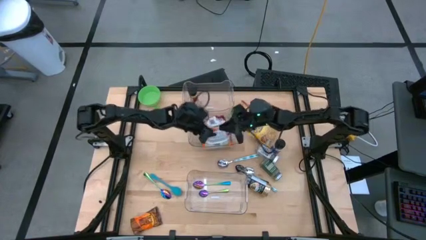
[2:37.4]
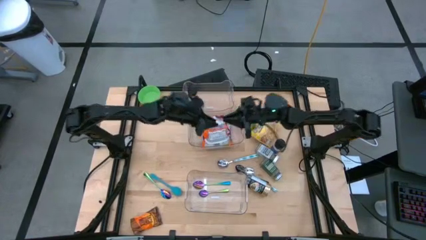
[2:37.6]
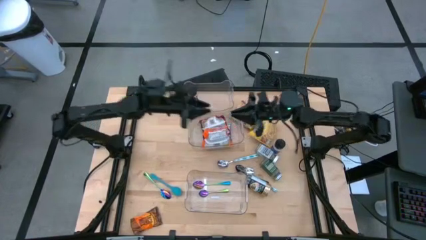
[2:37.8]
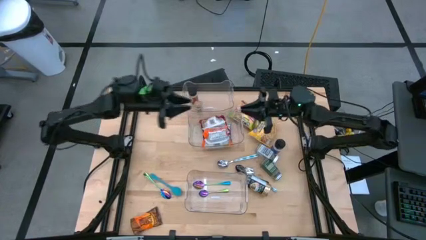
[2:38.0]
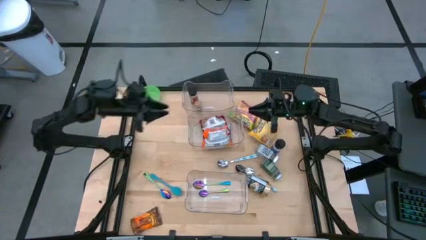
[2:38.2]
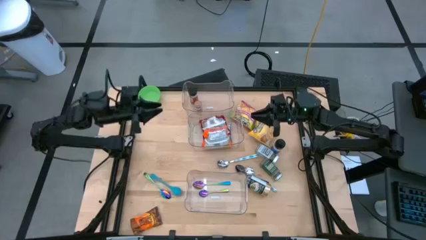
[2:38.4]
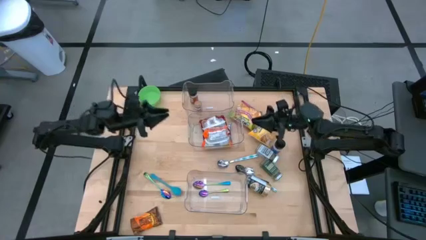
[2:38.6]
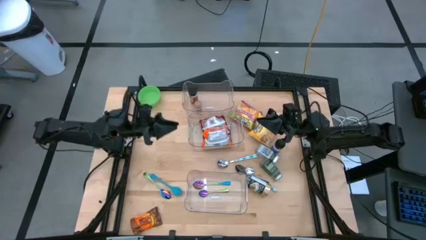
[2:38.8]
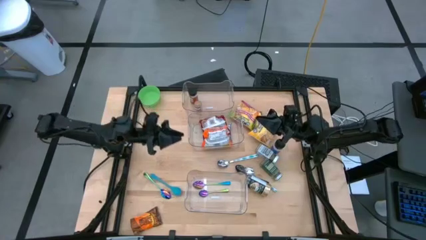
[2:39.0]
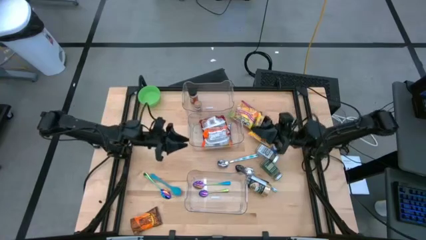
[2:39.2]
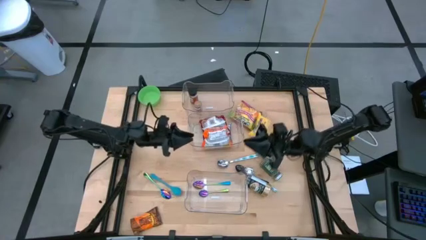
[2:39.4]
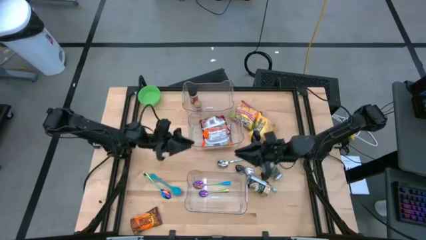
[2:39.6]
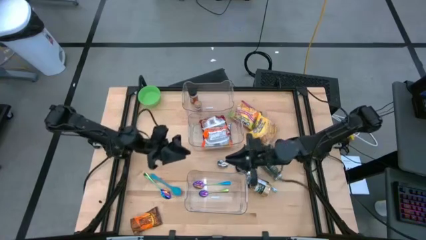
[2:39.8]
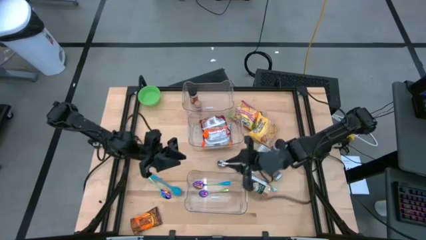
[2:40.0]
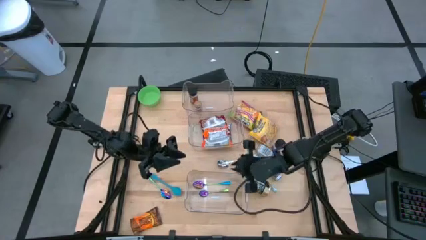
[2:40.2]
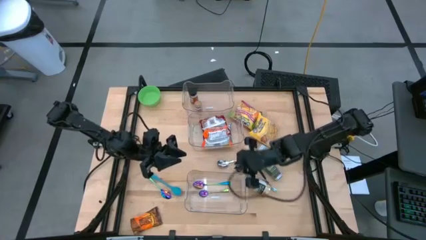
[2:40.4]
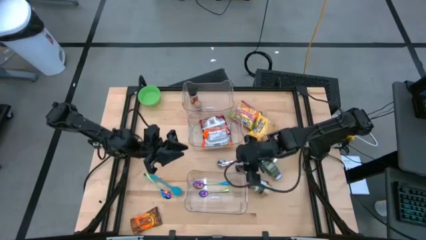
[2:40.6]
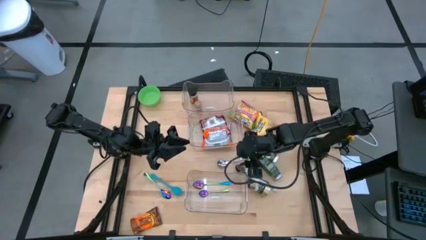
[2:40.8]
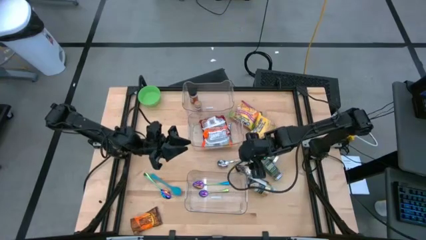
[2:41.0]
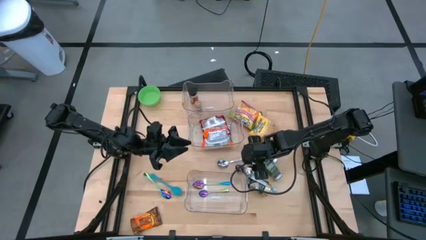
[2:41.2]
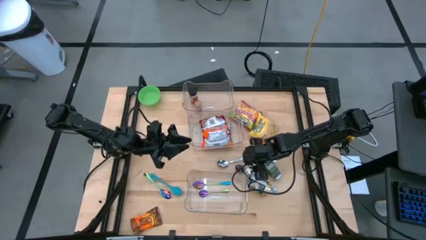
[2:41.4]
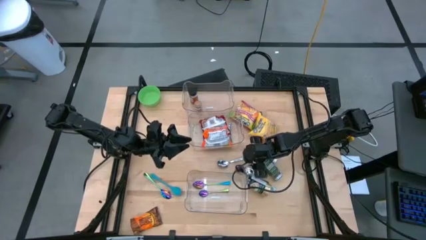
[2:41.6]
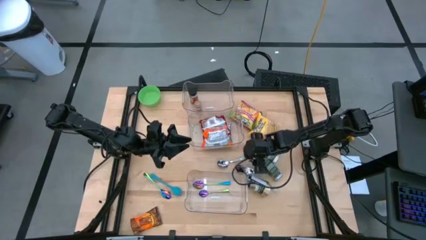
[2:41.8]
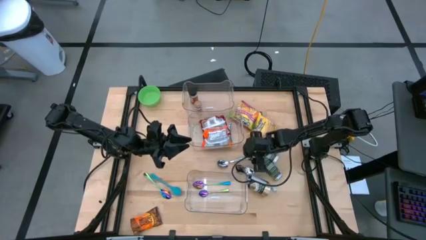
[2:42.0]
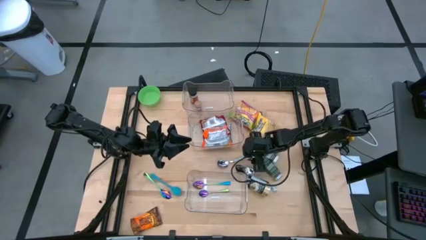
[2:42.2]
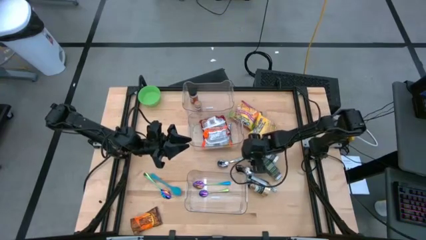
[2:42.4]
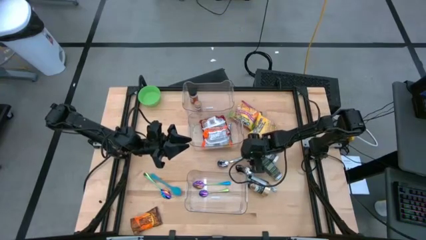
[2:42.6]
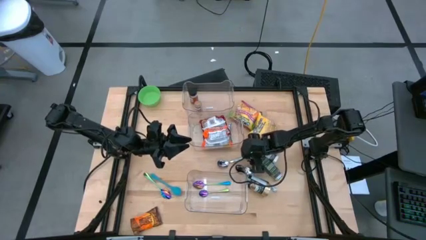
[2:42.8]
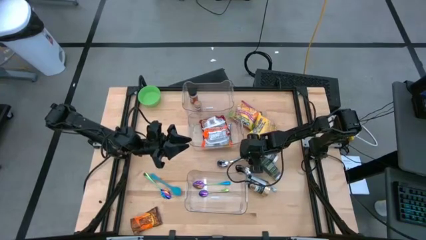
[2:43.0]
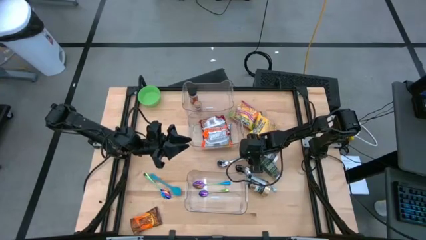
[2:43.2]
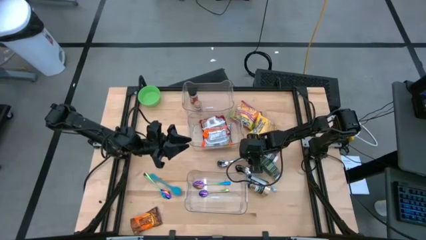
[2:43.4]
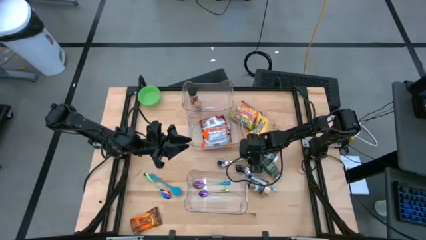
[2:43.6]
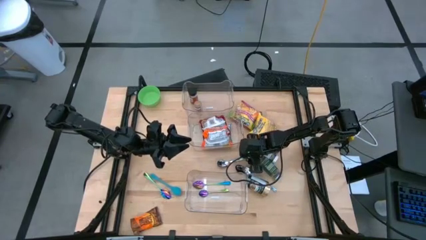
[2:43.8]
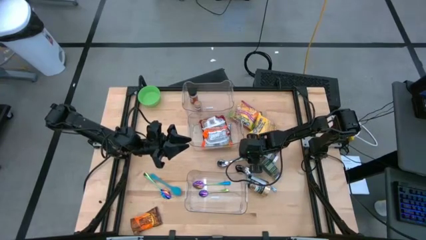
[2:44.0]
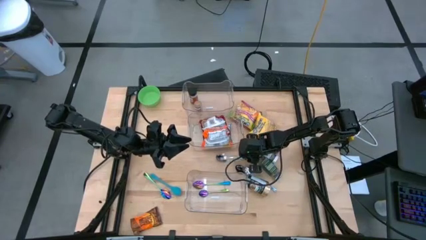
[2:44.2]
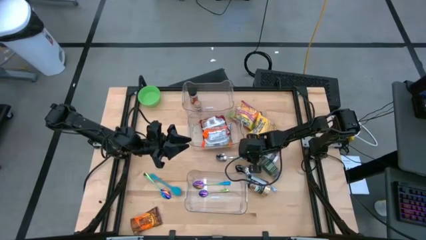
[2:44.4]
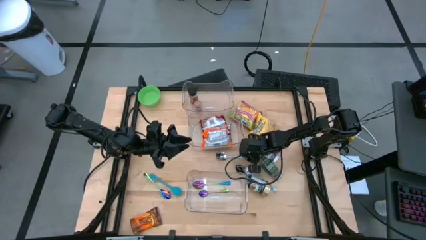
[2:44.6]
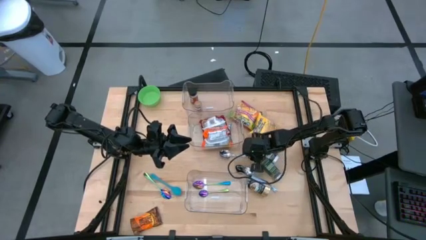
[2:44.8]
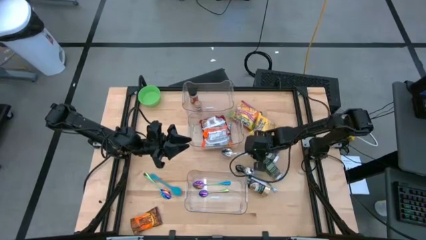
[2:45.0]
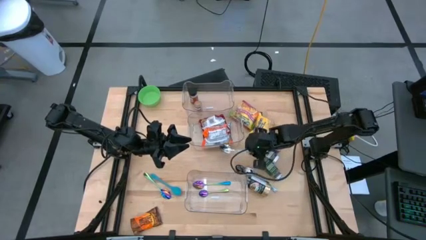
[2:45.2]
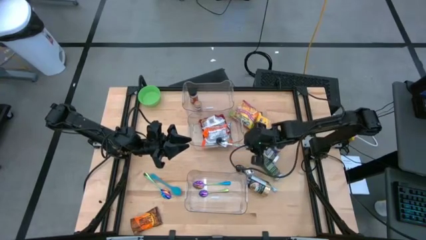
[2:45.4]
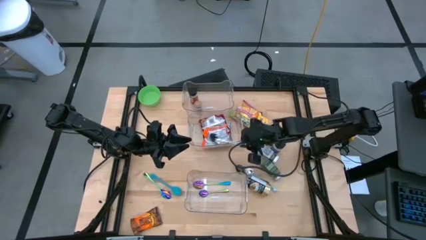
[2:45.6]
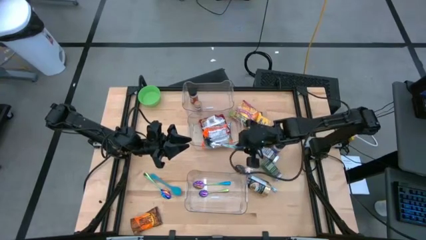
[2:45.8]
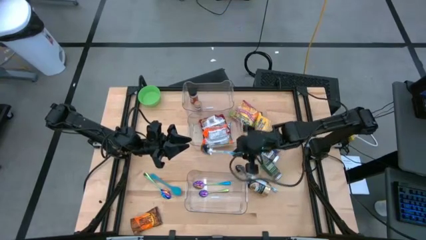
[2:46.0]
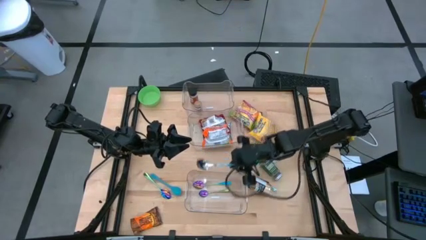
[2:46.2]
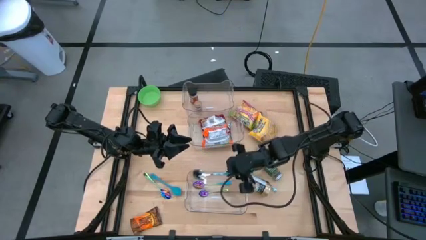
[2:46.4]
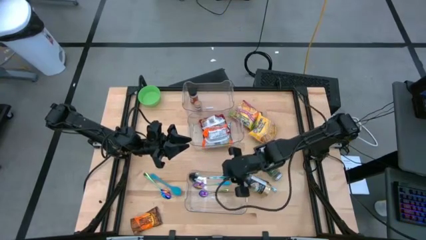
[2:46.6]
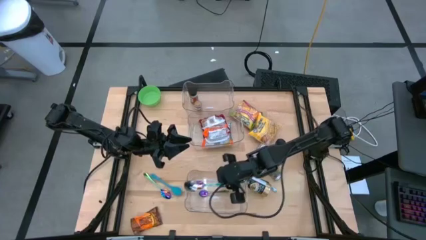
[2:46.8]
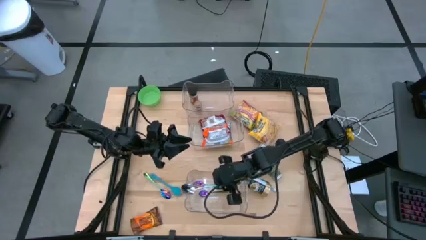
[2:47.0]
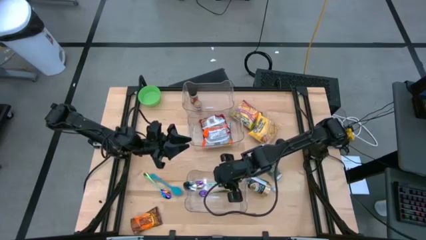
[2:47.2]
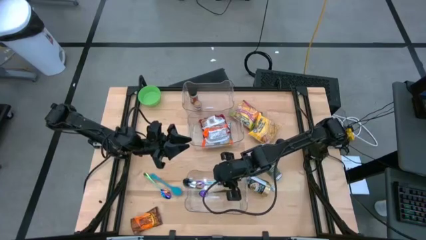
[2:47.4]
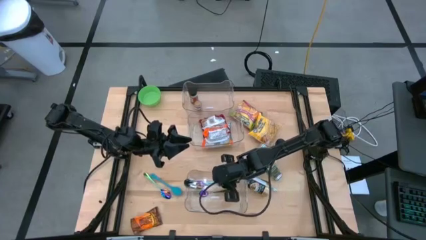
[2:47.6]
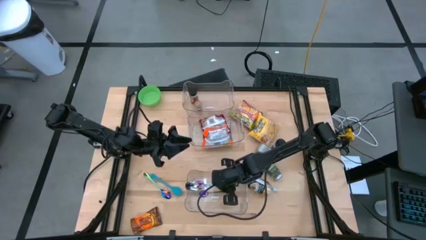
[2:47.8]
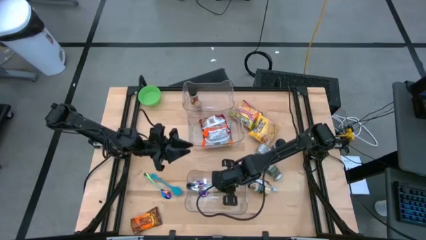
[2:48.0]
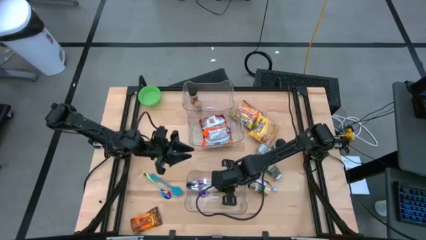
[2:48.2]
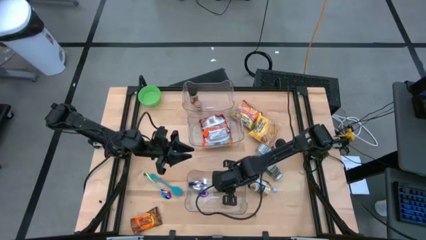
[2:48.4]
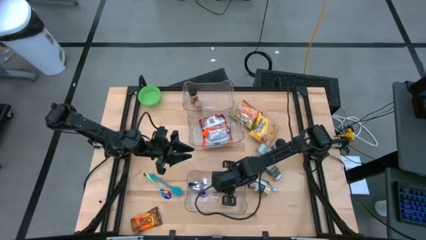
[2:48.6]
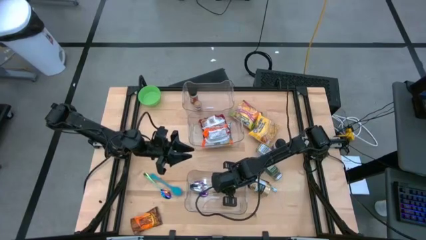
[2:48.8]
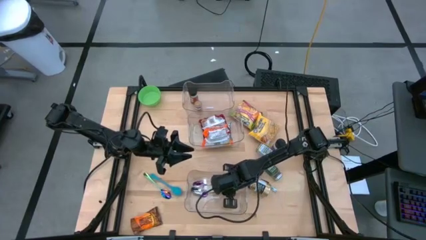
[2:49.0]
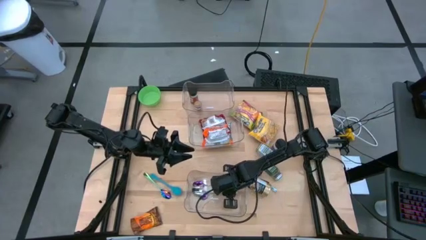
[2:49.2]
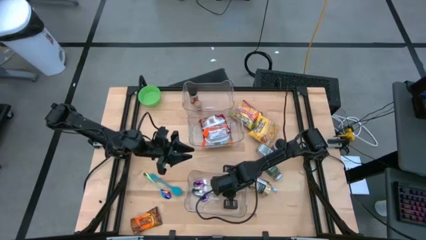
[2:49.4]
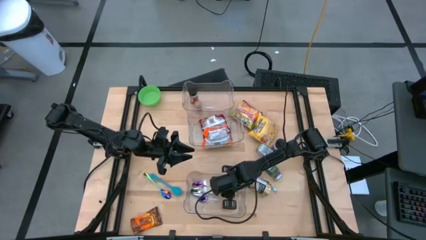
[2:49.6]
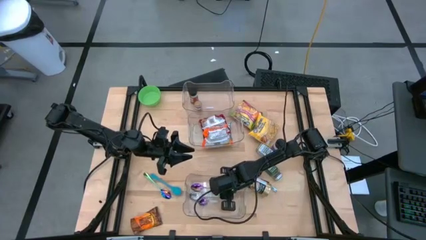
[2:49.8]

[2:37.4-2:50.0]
Task: Pick & Place Food Item
Put the top blue spoon into the bottom transparent bin

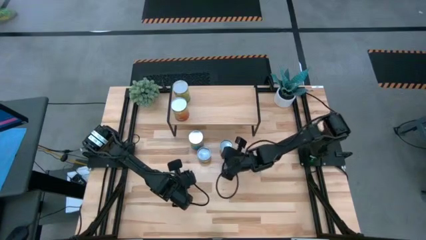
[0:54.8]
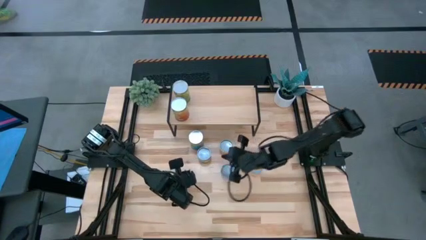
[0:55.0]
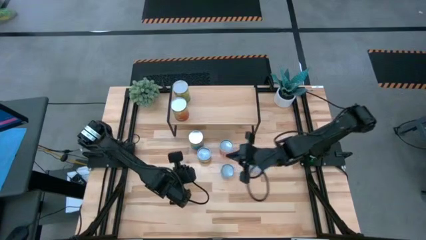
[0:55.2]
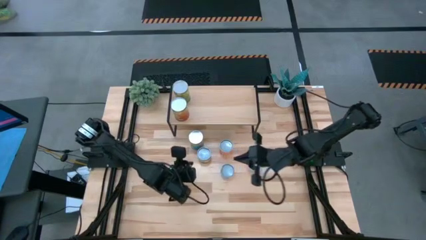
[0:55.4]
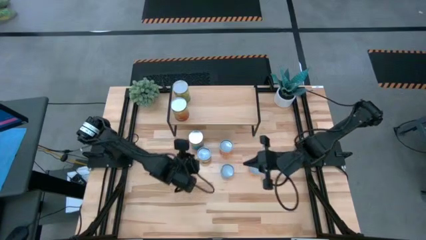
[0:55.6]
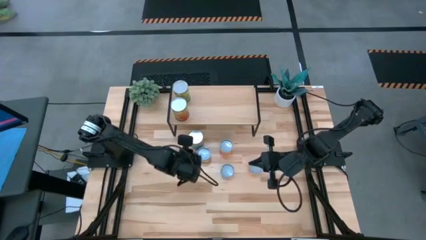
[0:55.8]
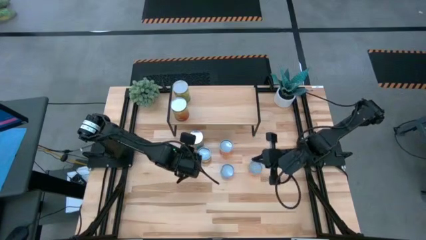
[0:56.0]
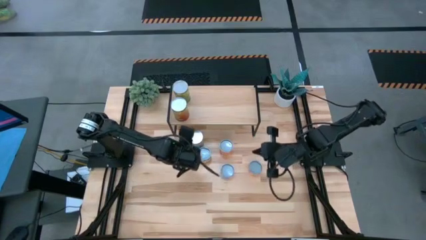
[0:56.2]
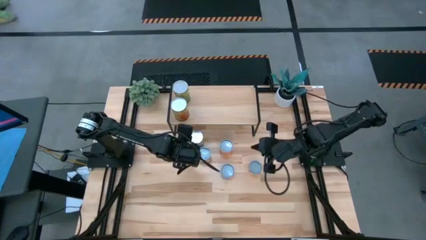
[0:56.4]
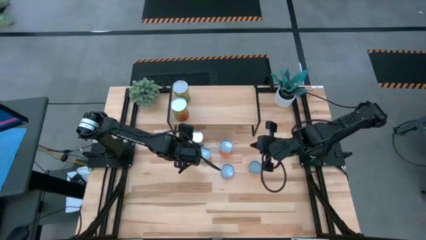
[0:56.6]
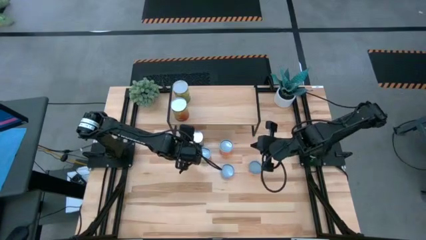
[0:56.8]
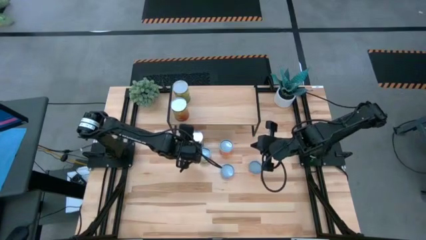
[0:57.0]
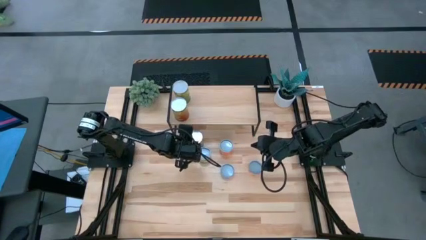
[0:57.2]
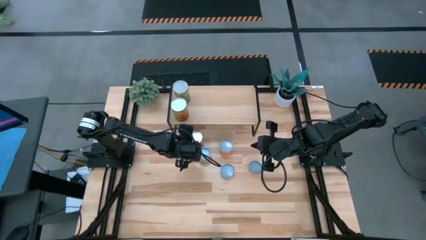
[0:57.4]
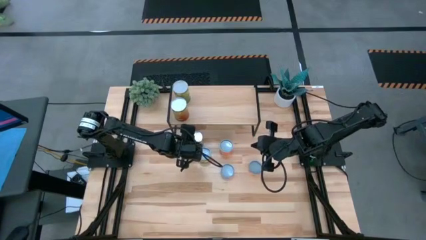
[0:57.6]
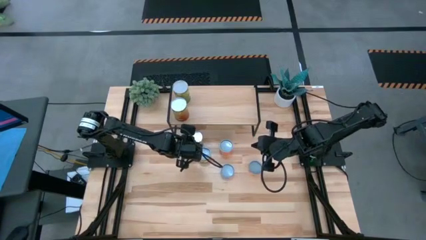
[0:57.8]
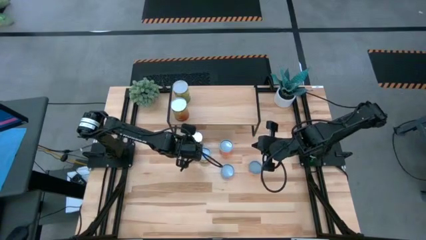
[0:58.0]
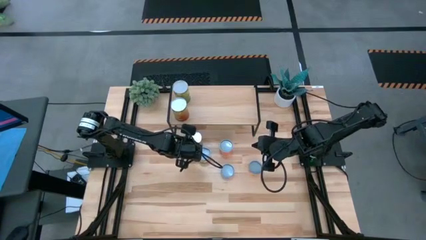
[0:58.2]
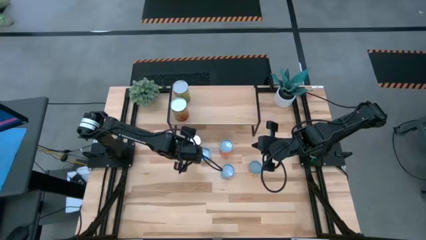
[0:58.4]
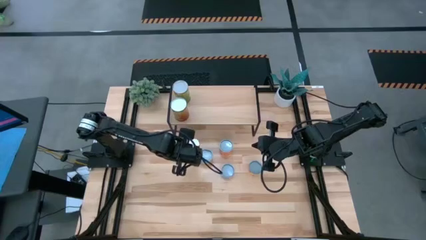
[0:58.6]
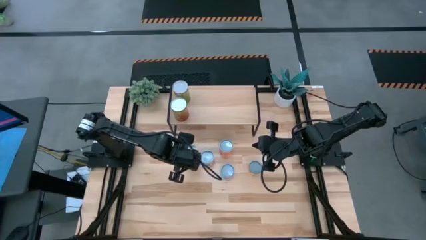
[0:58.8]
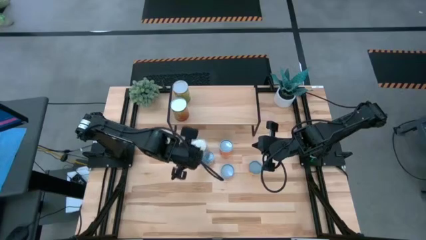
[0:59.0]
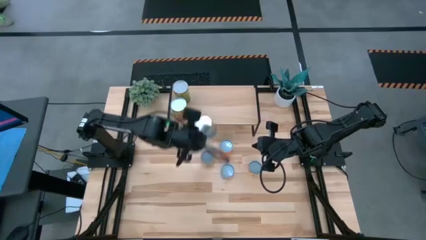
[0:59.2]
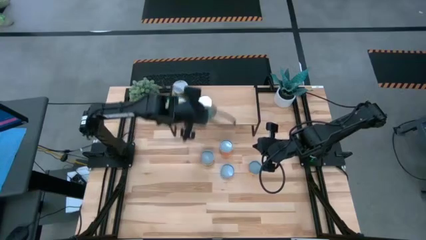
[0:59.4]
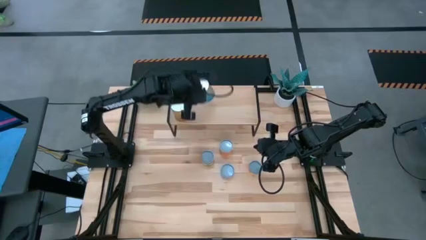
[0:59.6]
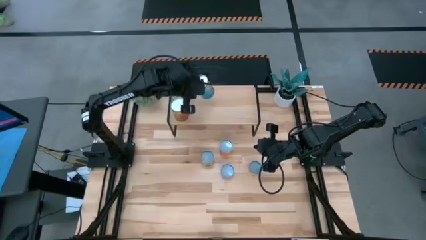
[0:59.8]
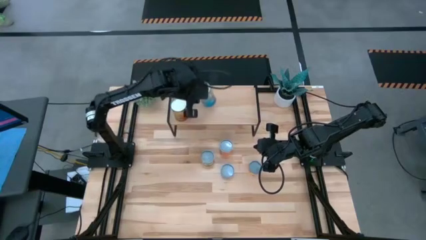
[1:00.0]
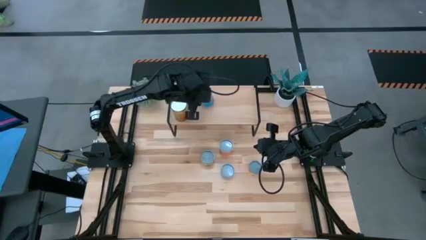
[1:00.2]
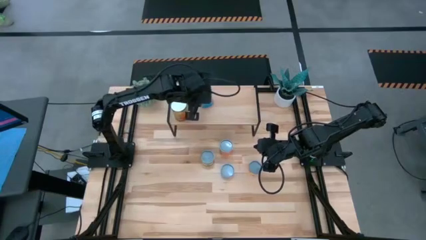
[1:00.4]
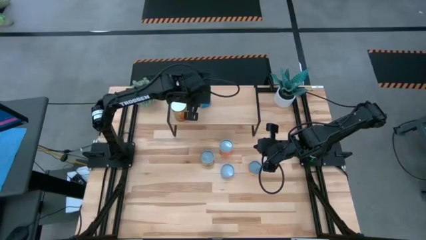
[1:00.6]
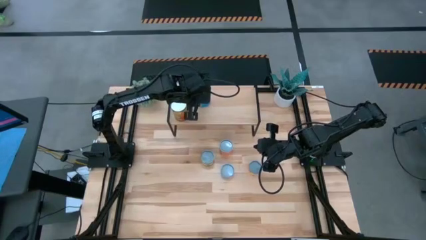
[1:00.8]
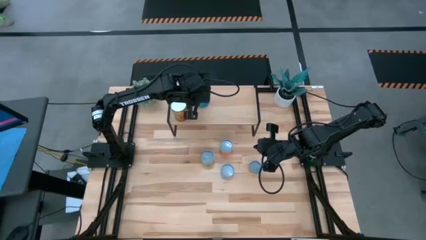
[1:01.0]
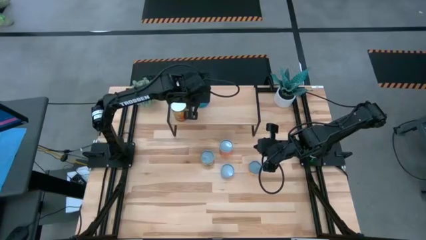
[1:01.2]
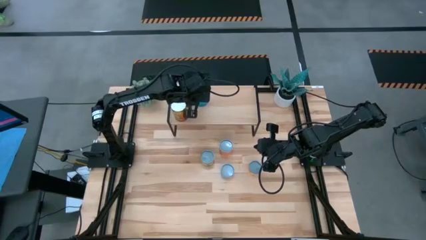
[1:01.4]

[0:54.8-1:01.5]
Task: Pick and place cans onto a shelf
Put the canned tomatoes on the shelf
